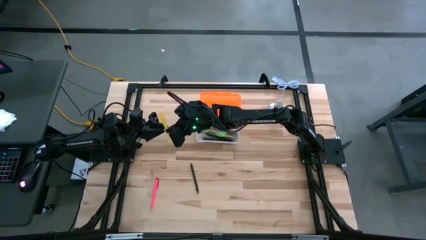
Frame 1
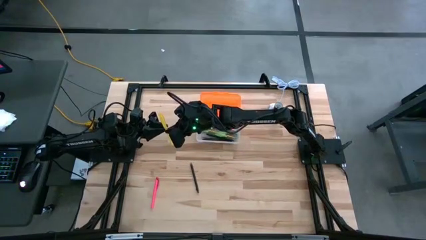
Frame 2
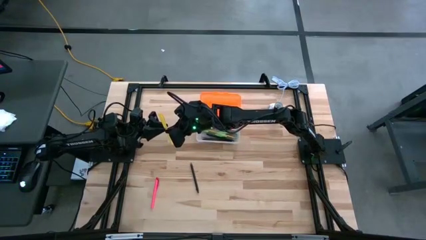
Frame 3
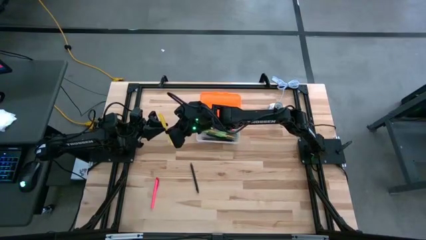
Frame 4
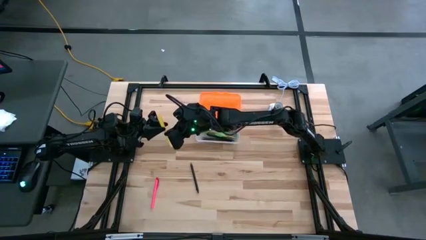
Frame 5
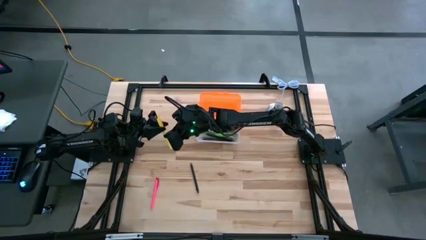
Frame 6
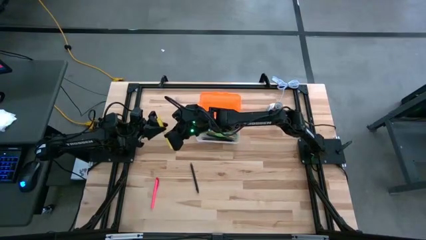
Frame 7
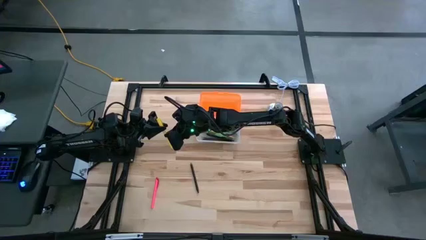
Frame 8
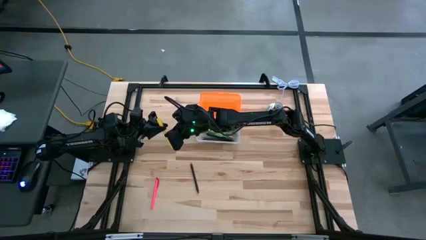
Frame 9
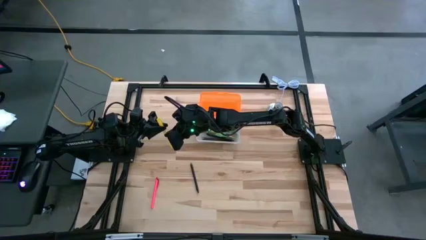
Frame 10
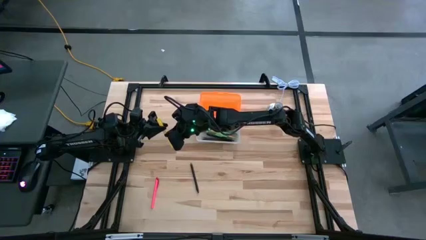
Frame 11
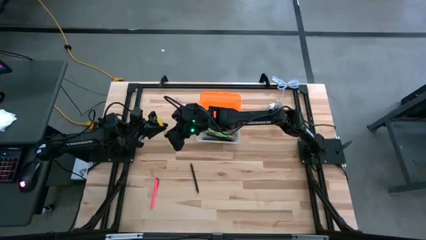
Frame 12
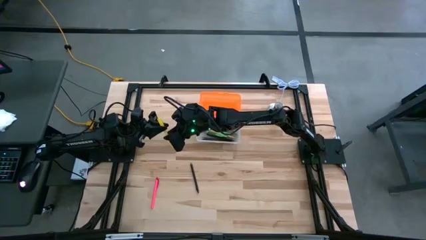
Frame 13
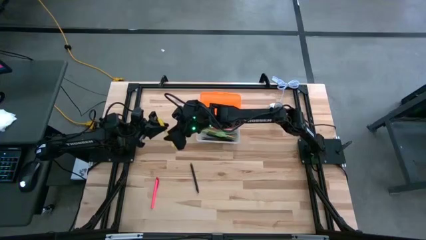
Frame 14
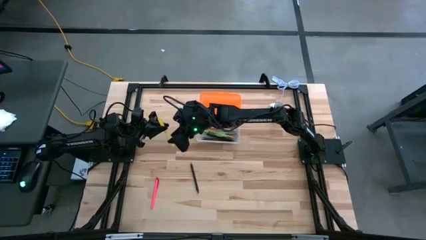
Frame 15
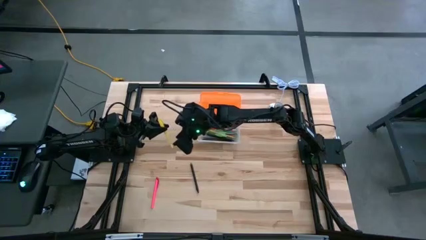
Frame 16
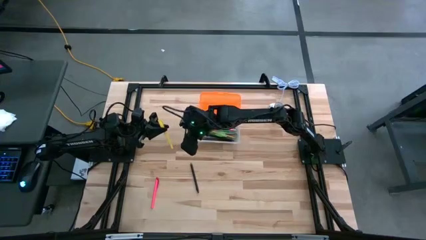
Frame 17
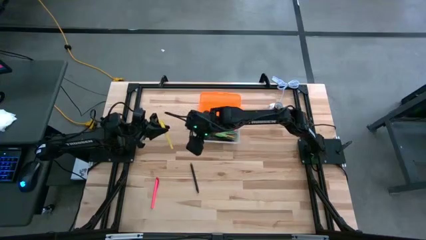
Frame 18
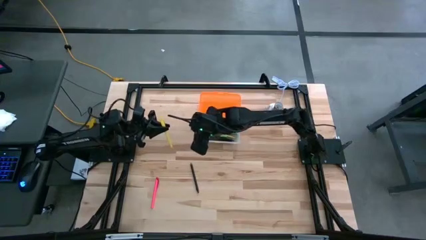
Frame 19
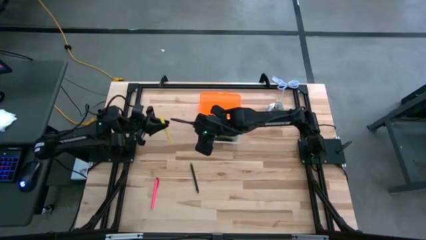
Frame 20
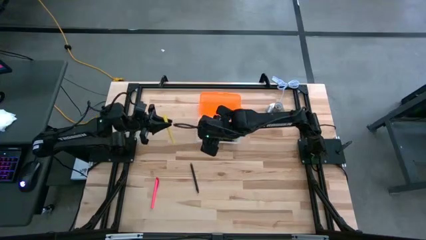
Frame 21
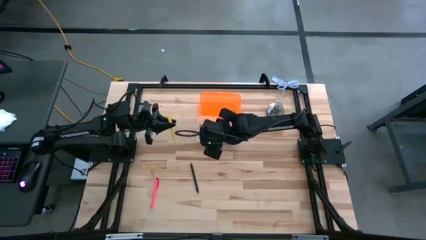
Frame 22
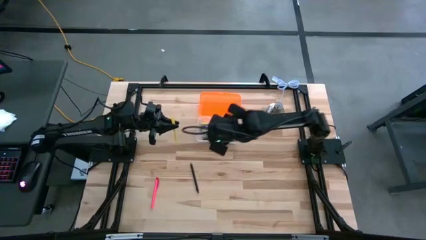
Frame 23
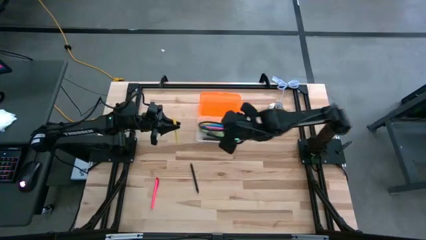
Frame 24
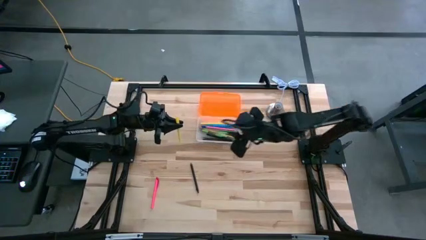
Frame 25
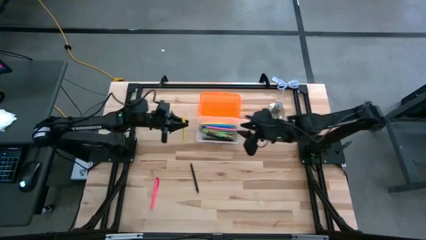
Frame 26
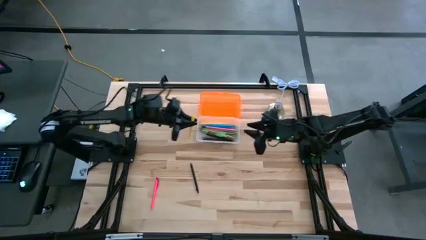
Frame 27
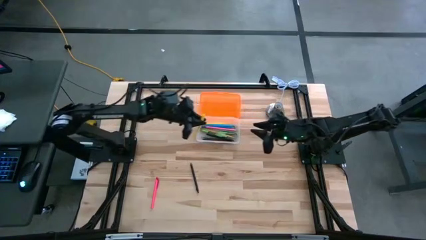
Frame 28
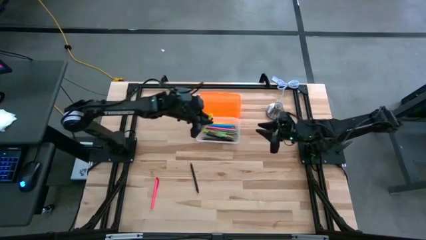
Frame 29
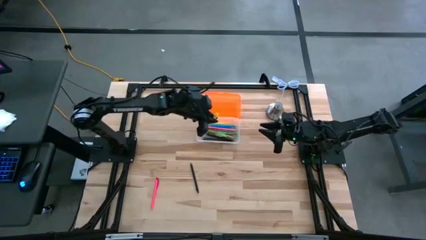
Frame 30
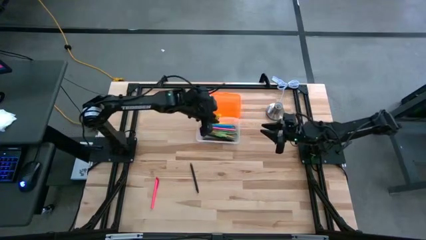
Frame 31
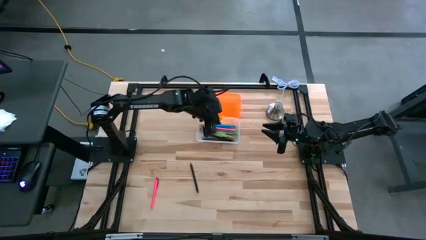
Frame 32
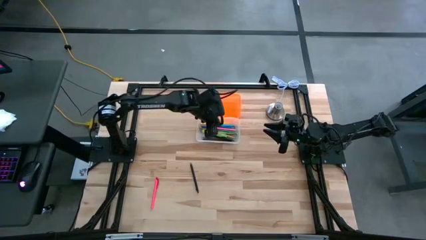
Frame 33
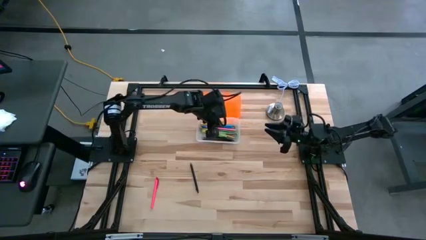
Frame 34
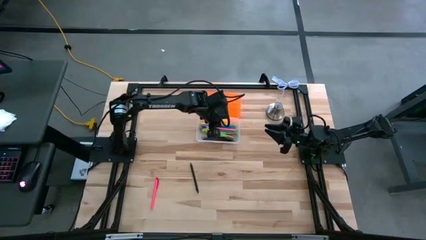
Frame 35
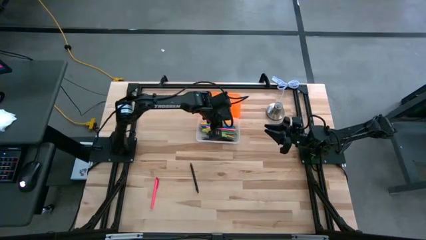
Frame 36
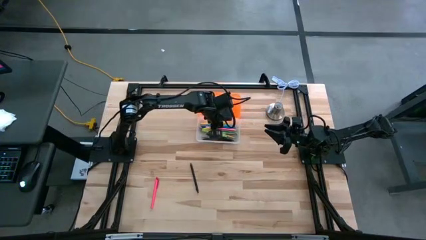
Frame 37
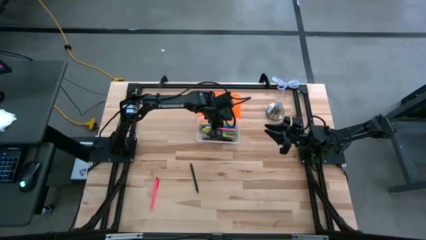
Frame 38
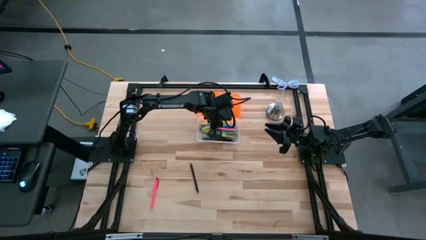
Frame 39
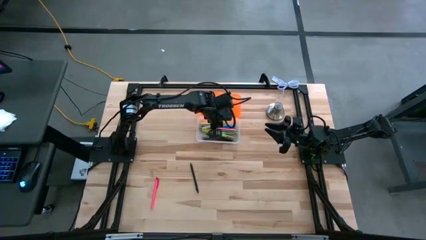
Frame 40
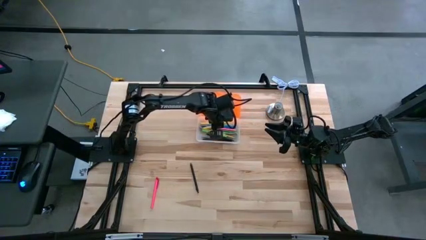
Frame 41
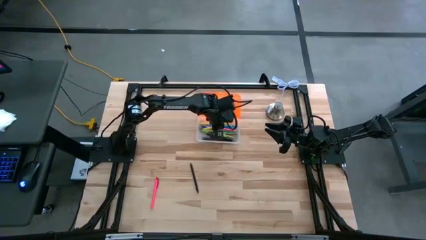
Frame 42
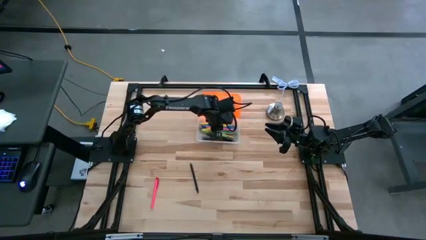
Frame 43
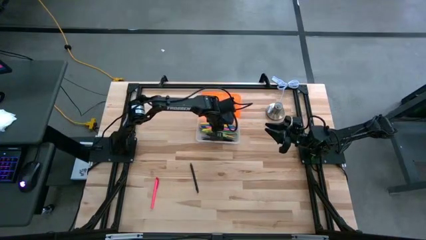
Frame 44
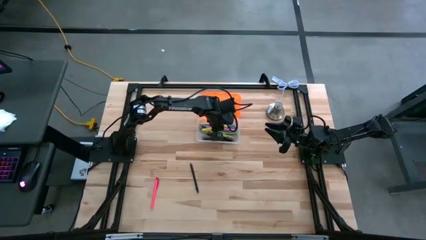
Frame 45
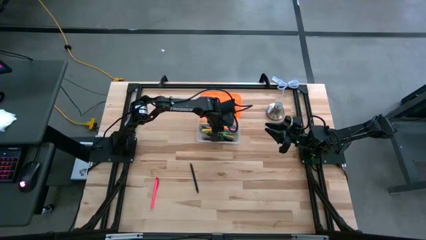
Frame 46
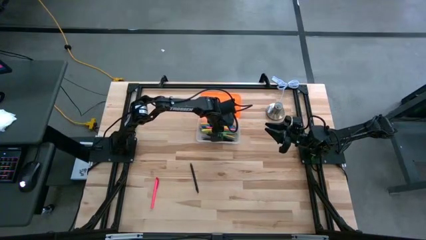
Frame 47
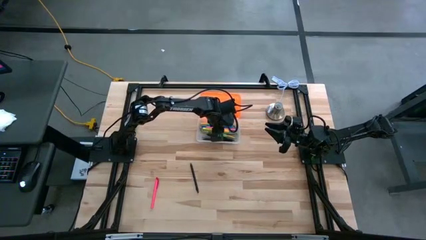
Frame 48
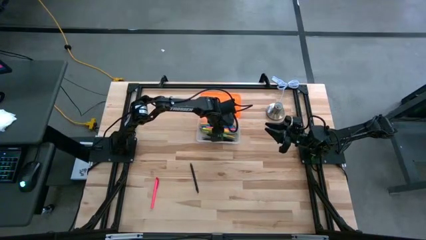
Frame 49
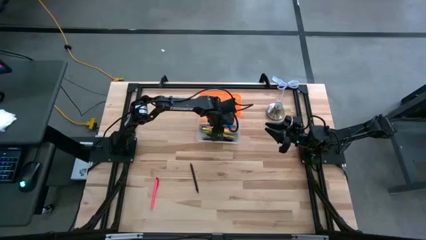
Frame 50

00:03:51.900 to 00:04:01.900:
Task: Pick & place school supplies into a supply box
Put the yellow pen into the orange supply box

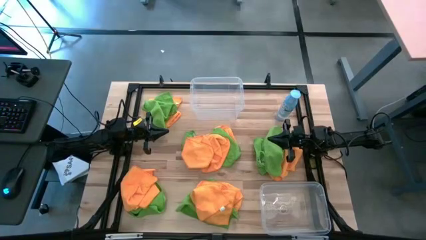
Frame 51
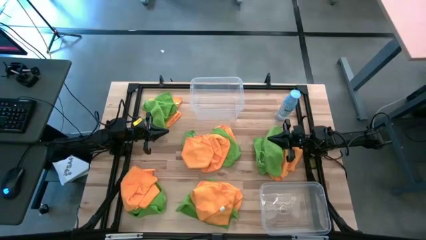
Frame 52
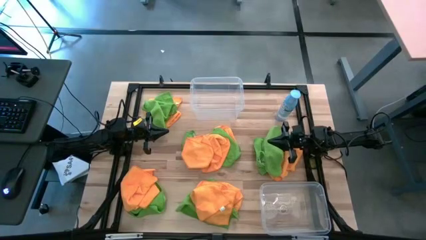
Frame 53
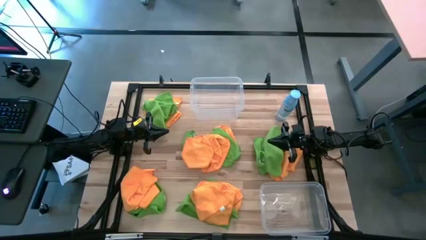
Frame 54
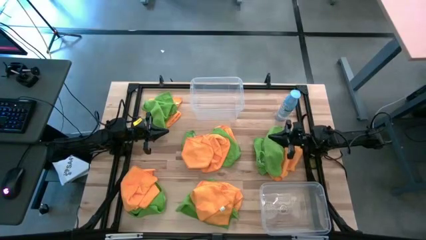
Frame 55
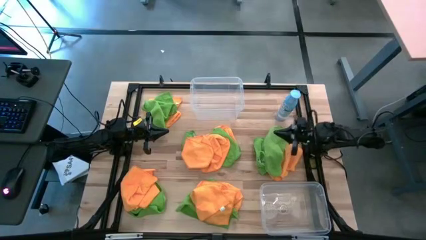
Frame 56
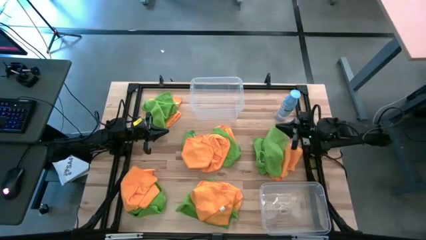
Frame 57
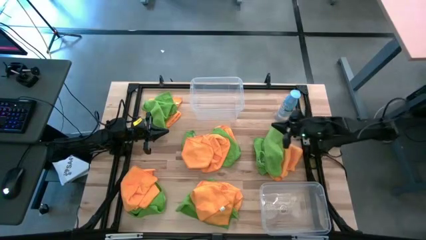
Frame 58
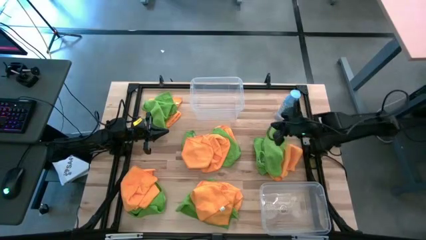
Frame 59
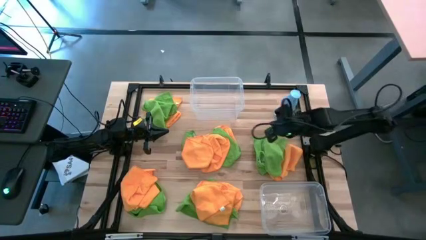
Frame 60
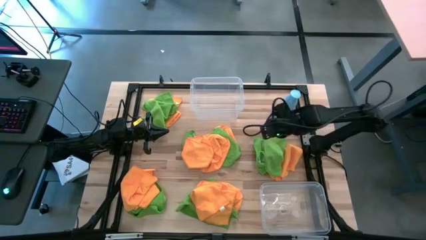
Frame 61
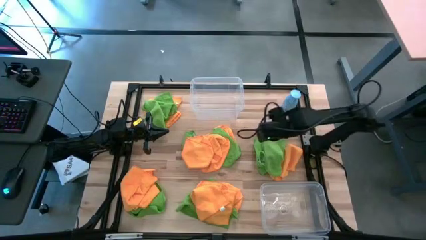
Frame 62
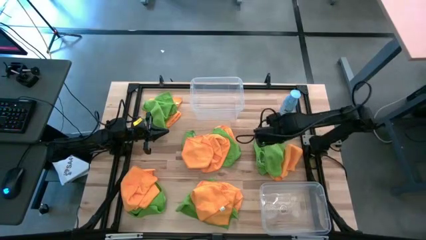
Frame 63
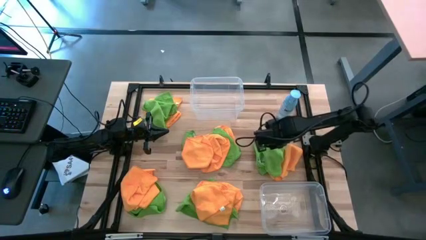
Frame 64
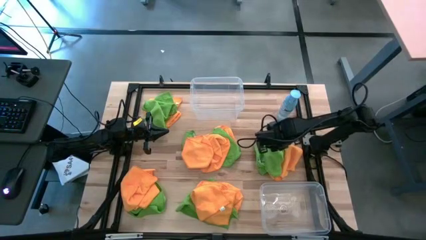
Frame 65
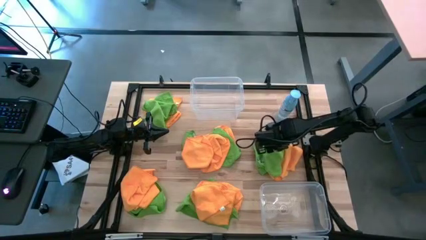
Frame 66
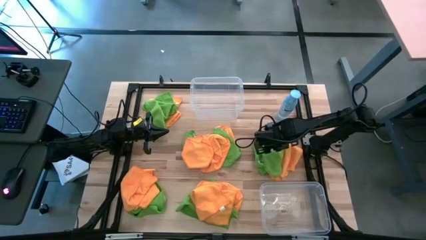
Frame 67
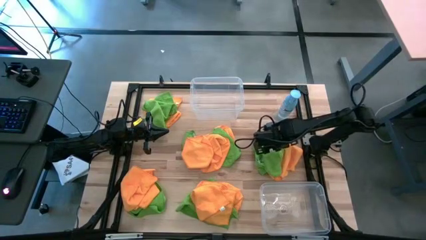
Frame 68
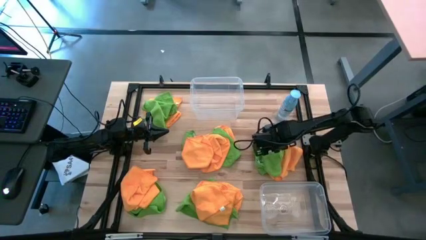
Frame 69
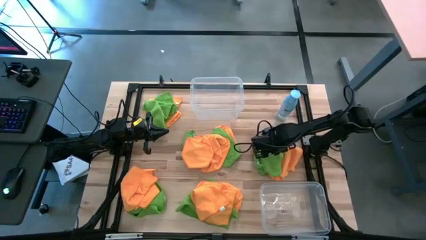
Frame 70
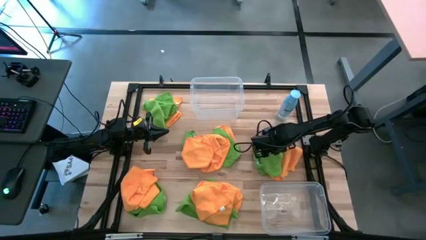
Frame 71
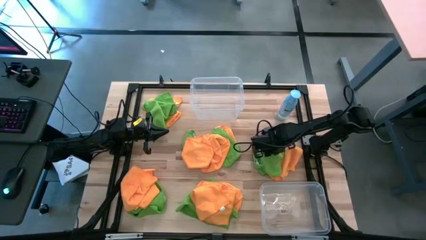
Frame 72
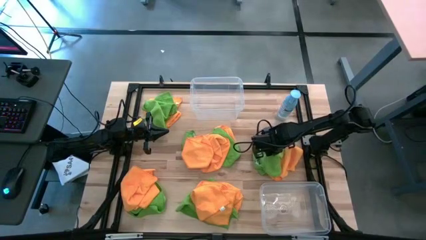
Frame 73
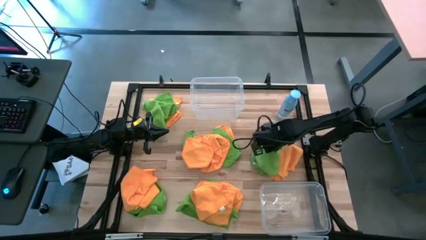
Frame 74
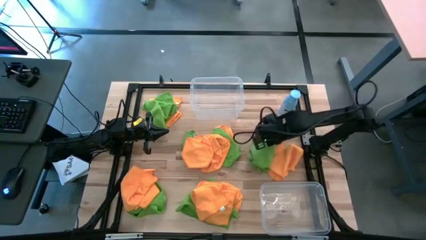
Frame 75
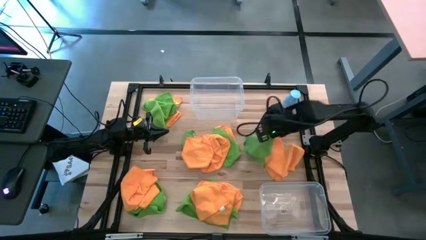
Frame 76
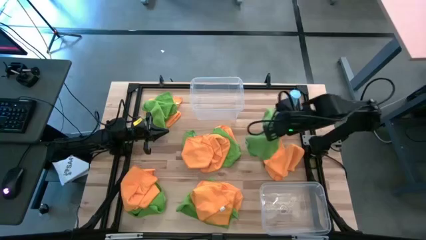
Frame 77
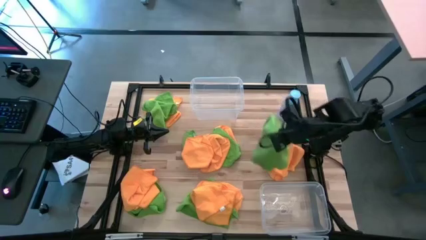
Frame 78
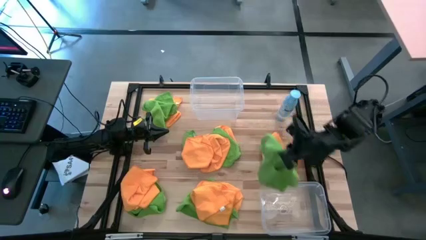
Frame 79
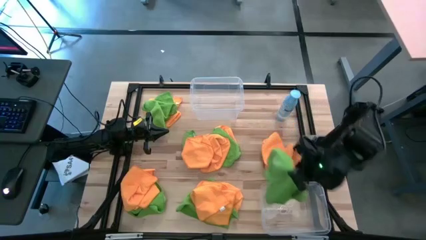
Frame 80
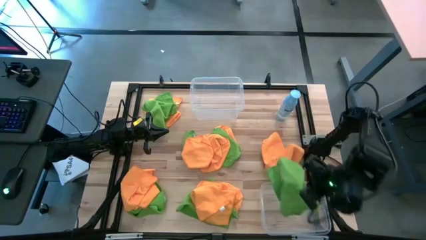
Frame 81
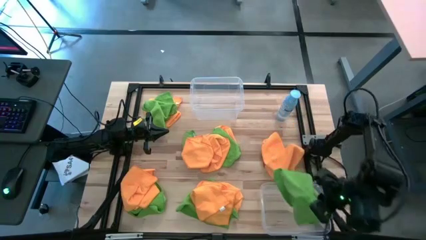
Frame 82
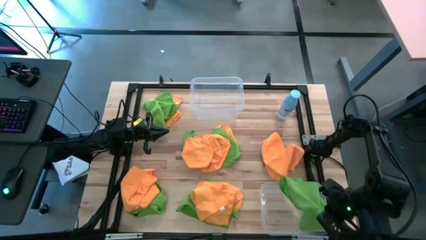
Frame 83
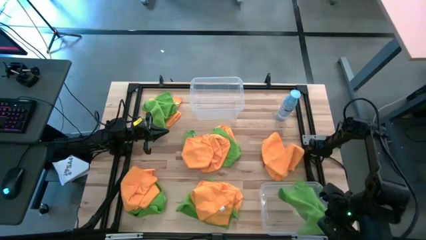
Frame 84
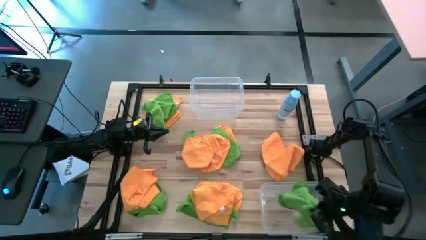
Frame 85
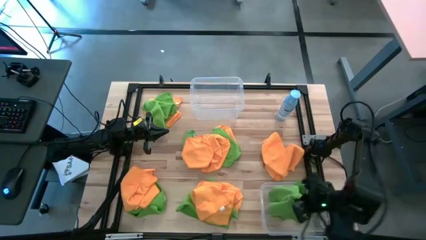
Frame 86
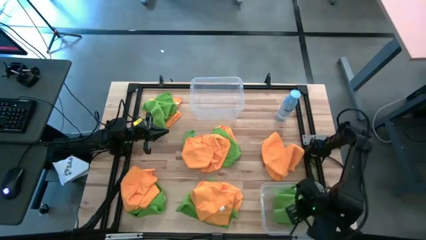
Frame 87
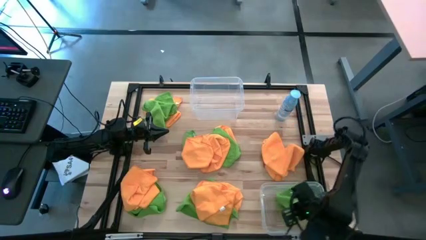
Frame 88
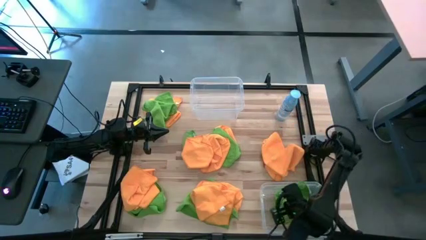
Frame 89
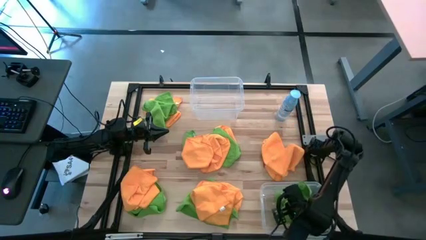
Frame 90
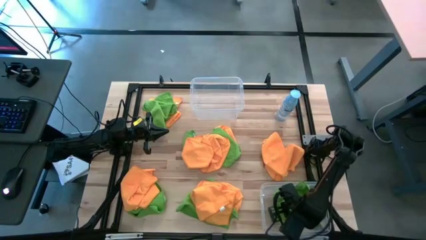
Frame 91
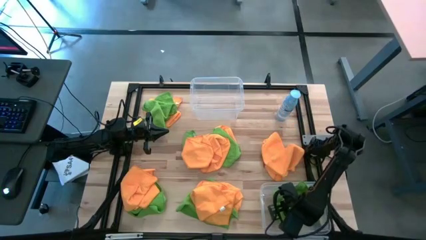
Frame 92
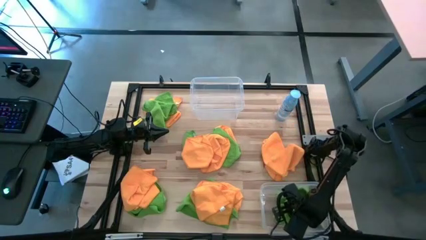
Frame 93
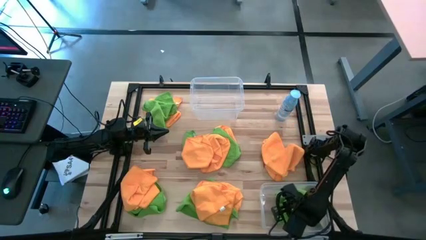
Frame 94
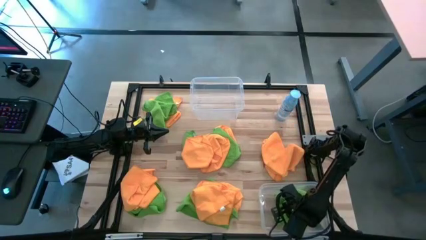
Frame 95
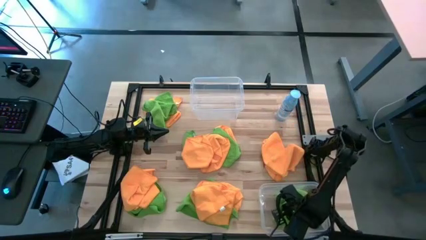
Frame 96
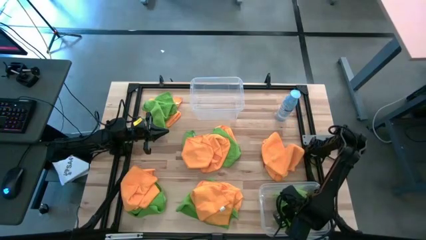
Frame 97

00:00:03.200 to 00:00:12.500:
Task: Sort microfiber towel by color & place in baskets
Put the green microfiber towel into the bottom transparent bin
